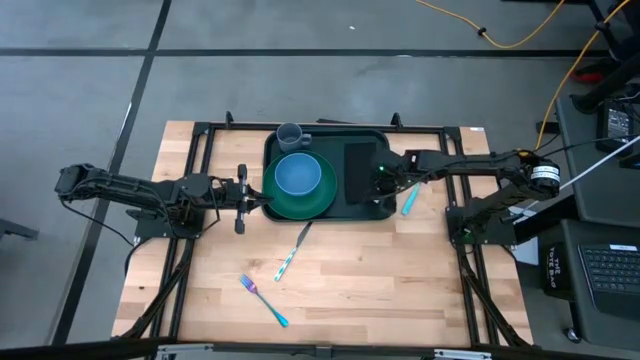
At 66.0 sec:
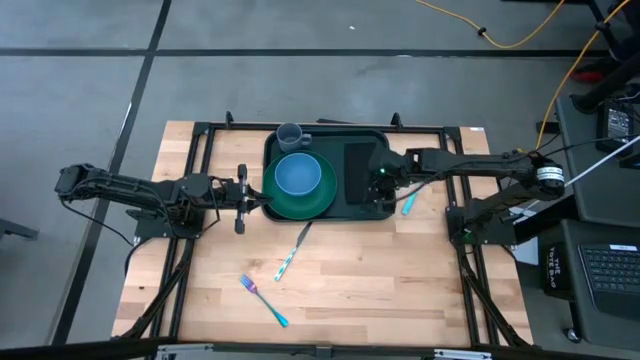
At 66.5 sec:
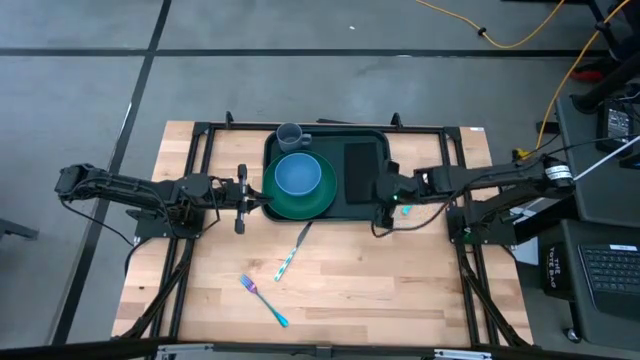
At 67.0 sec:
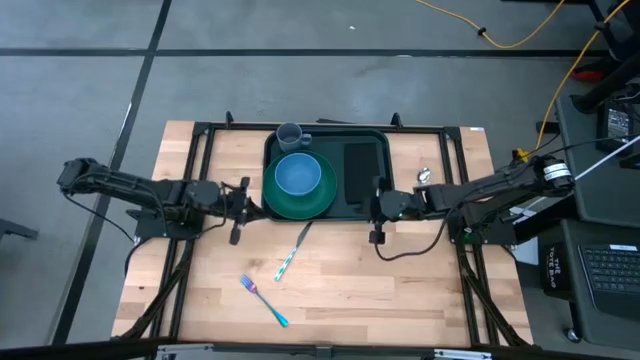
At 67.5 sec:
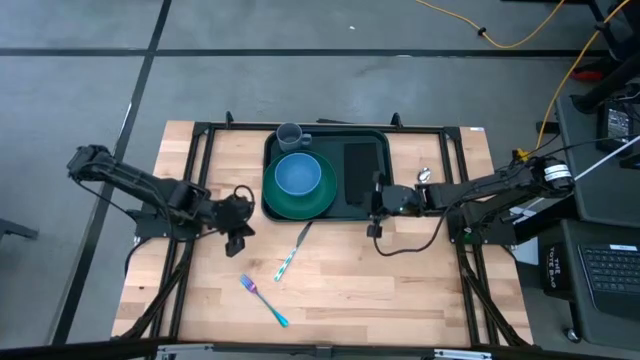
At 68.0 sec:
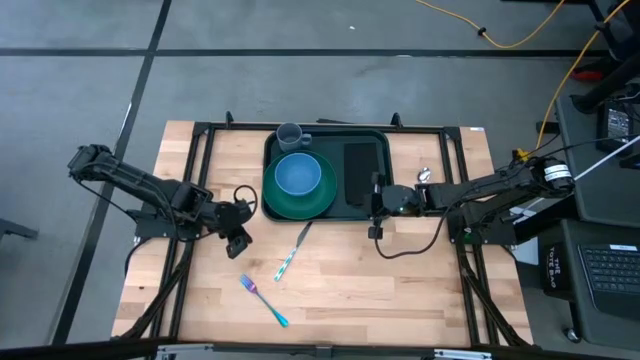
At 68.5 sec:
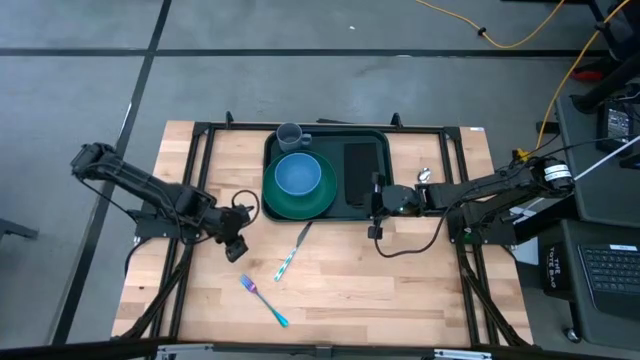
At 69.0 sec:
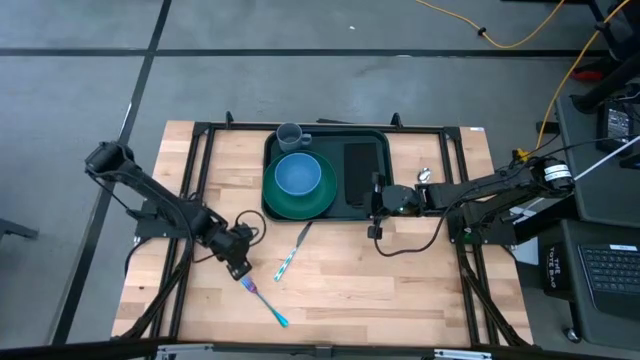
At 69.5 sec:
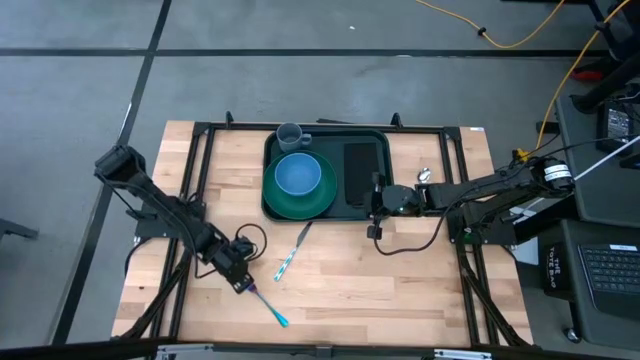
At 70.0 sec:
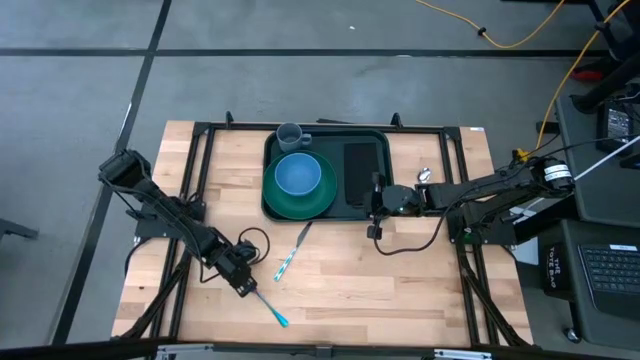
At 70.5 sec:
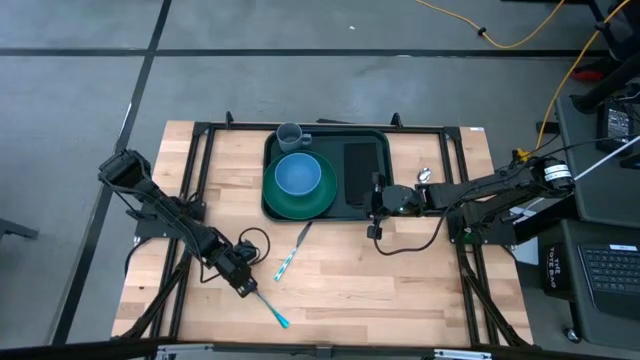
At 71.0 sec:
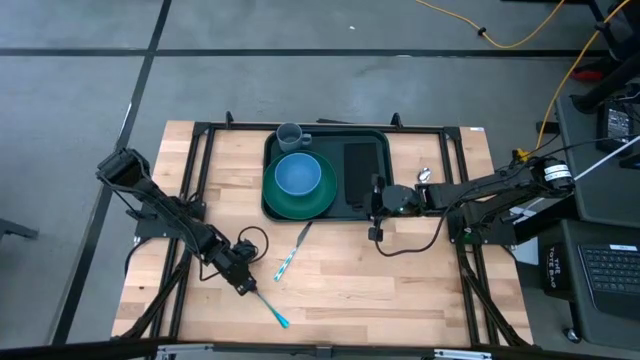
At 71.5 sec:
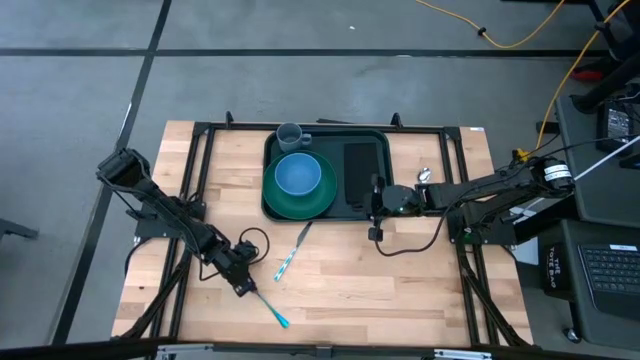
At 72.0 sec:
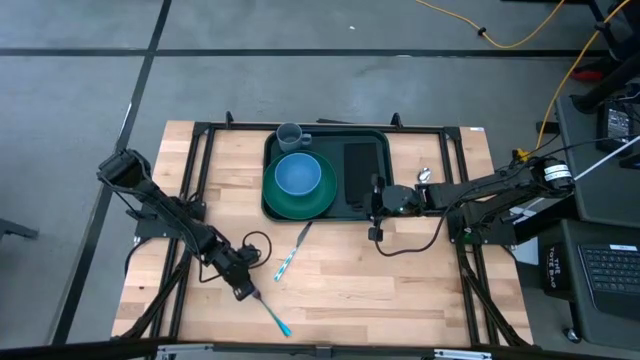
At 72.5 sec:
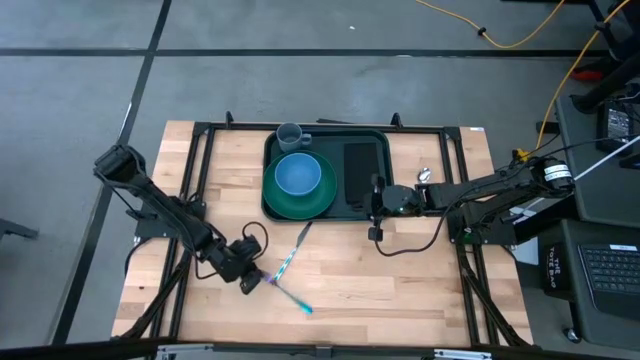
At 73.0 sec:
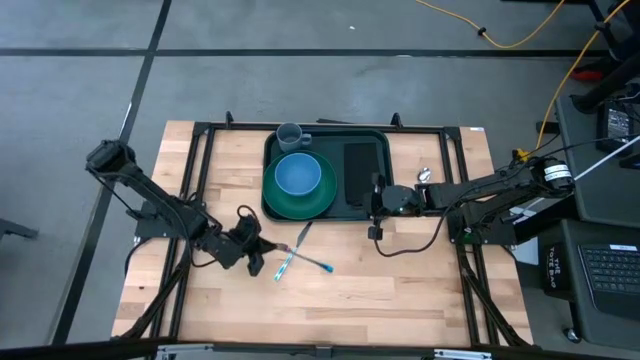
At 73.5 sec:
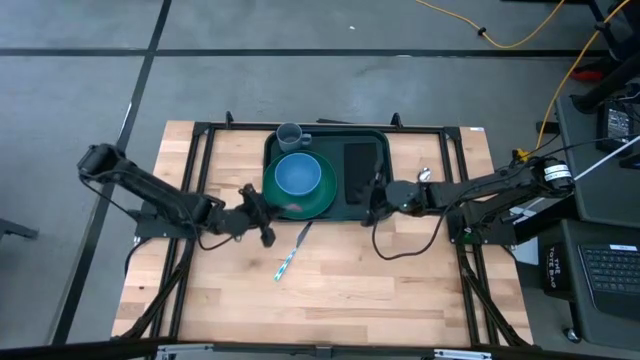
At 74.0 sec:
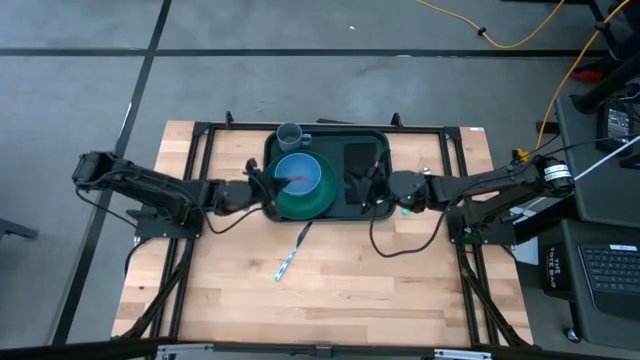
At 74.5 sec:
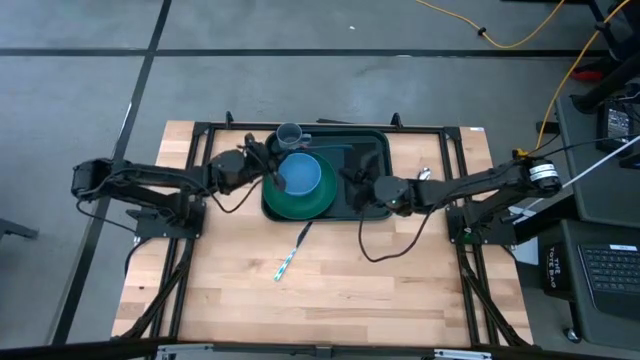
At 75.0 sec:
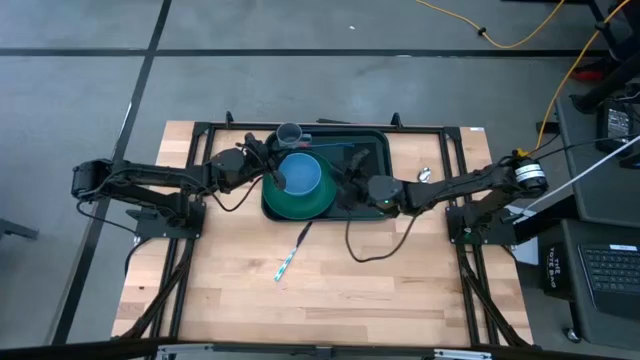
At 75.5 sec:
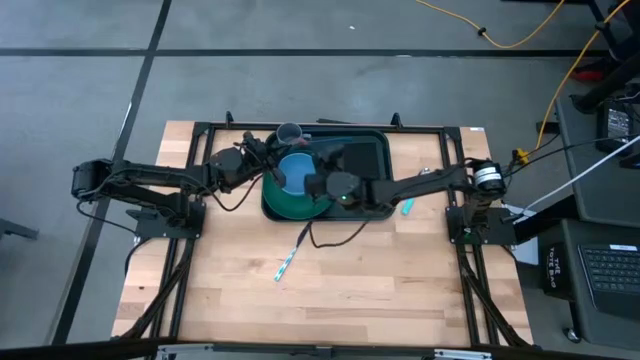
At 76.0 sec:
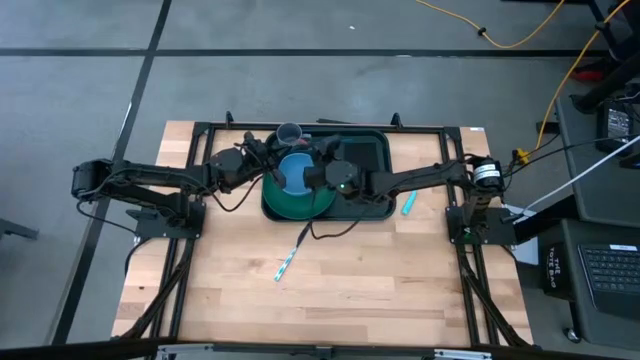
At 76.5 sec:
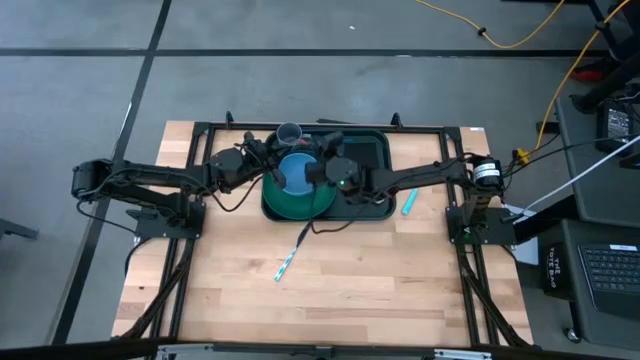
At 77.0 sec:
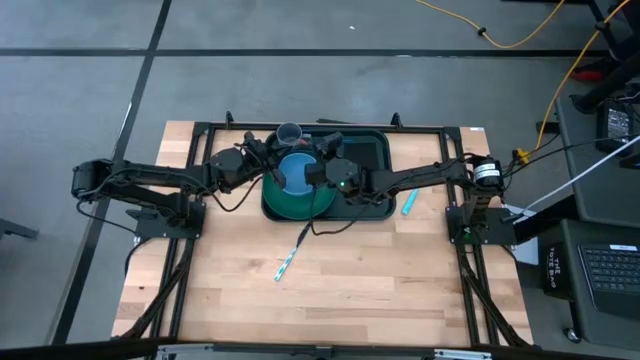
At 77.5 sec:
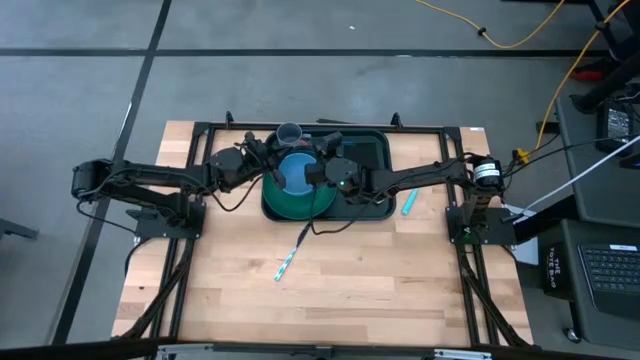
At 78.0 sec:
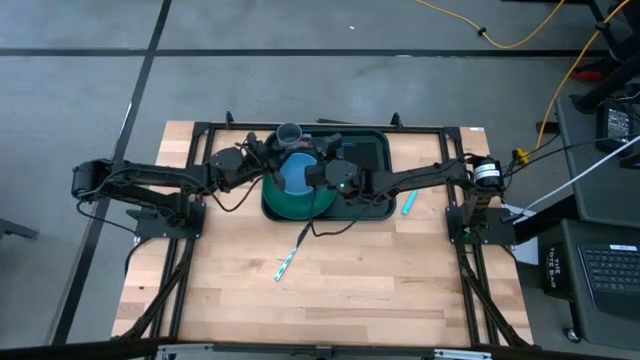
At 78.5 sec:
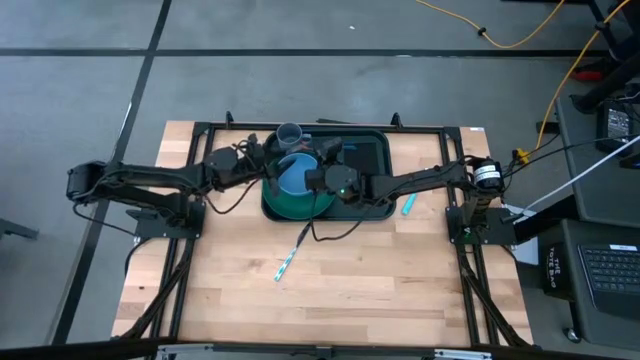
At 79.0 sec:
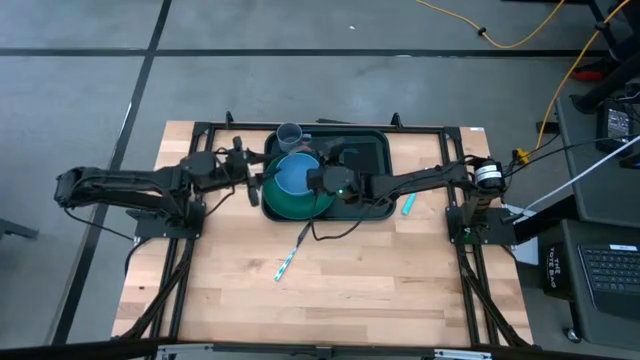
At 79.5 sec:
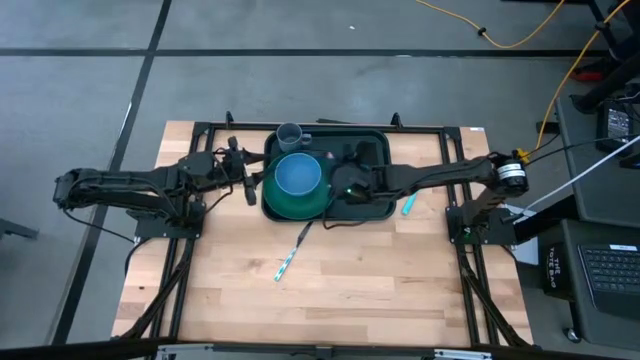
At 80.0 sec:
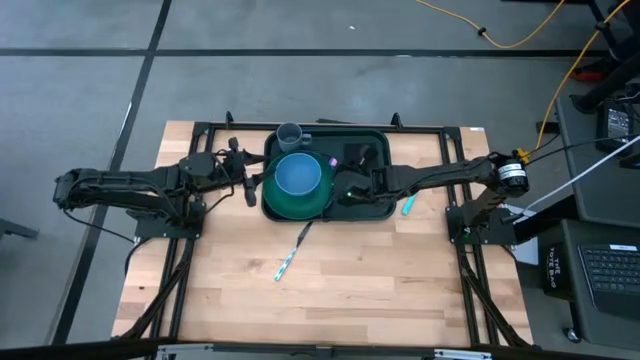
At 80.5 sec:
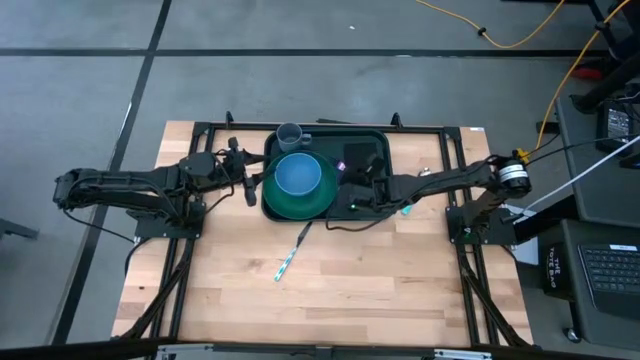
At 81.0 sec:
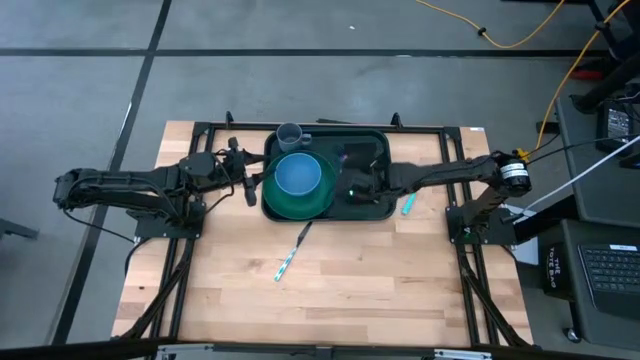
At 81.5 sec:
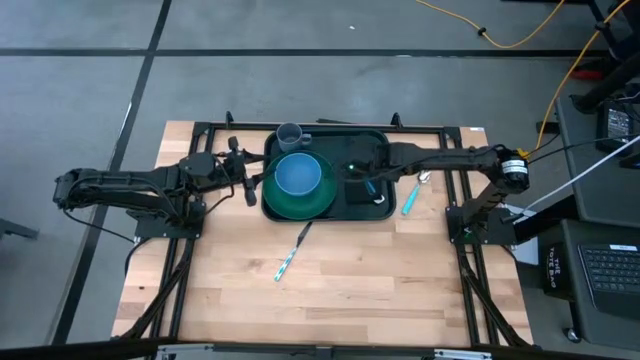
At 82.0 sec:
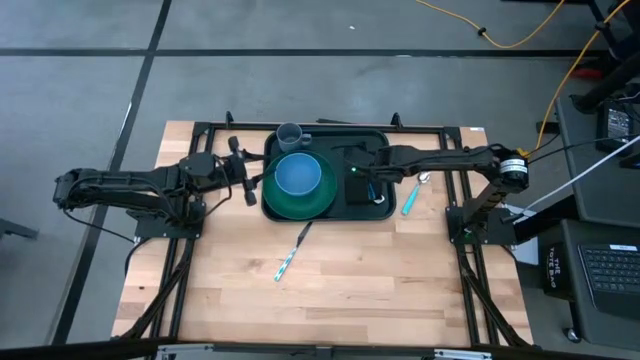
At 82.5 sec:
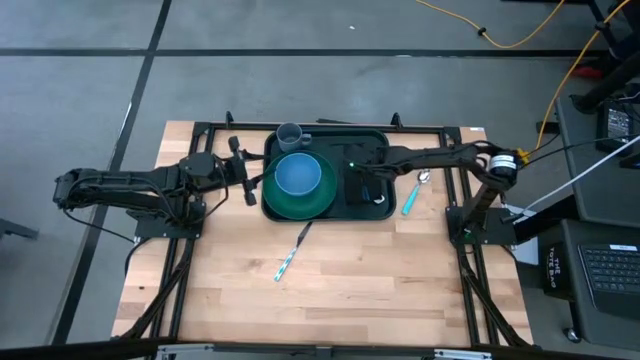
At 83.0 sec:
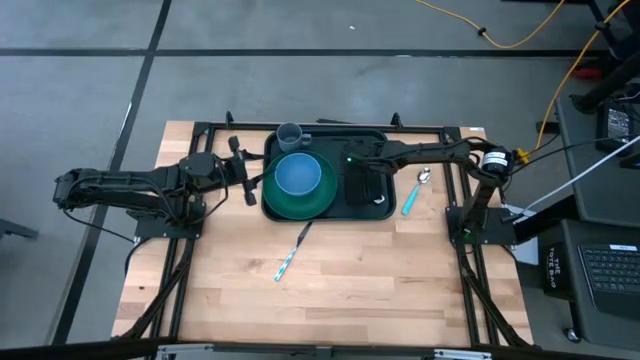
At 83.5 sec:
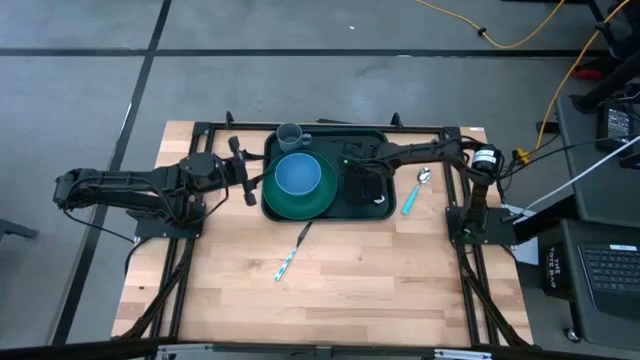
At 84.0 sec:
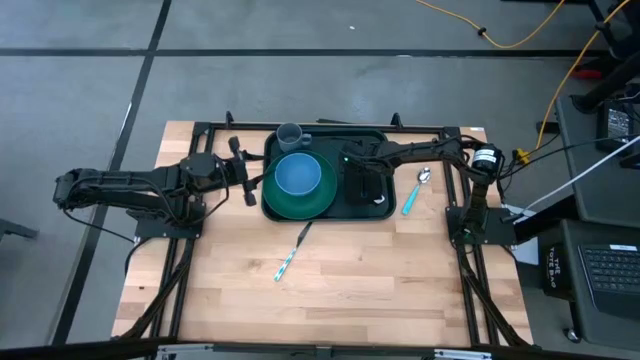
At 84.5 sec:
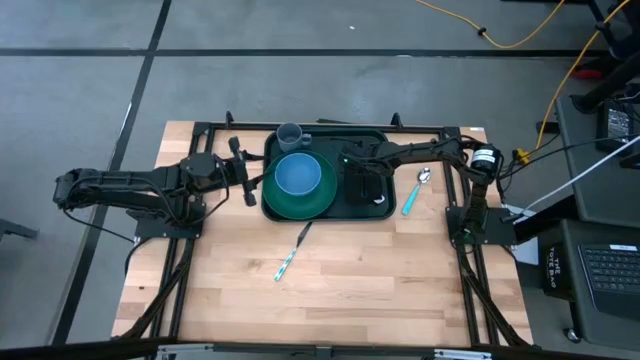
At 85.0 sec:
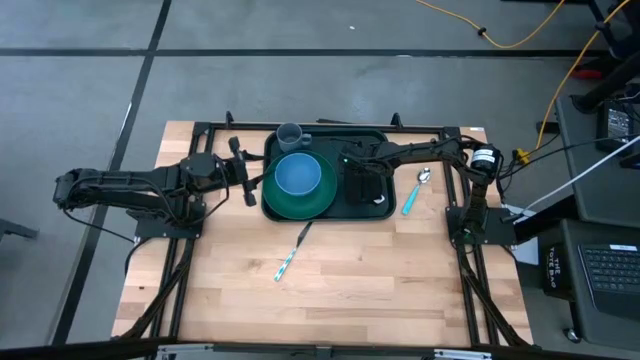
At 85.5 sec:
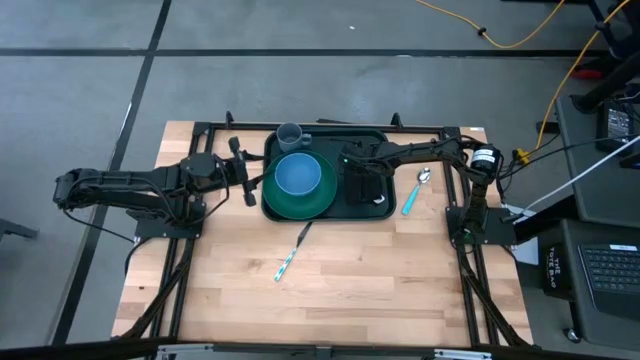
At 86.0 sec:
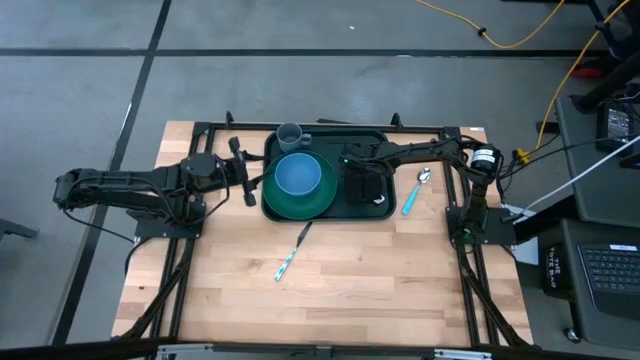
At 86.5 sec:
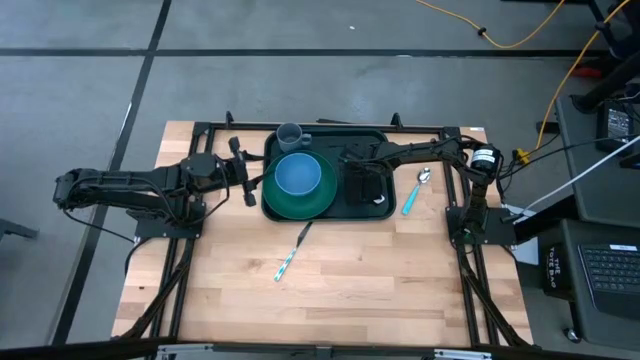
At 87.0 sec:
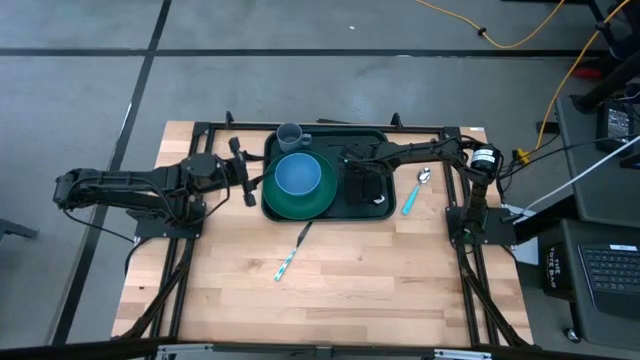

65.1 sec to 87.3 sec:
Task: Set up tray
Put the fork on the napkin
